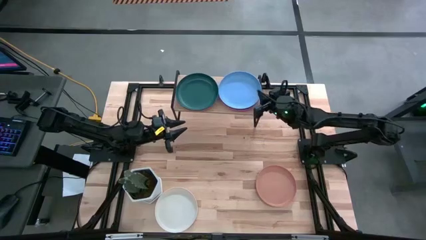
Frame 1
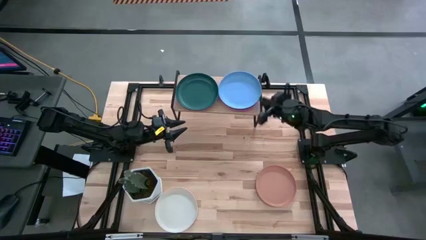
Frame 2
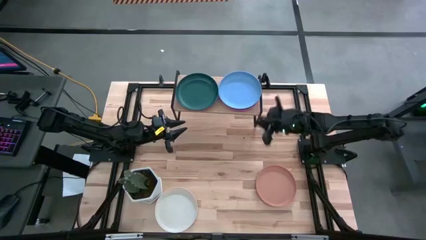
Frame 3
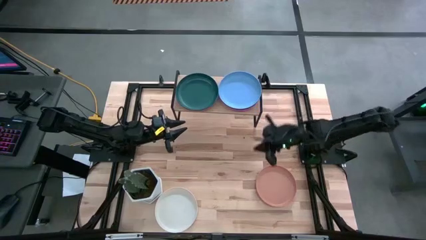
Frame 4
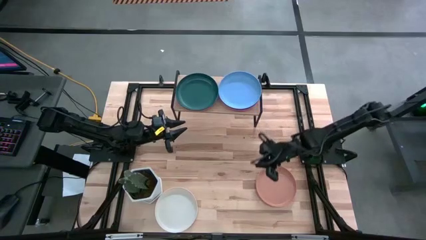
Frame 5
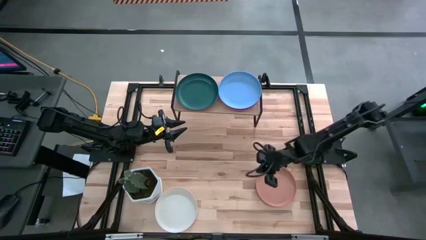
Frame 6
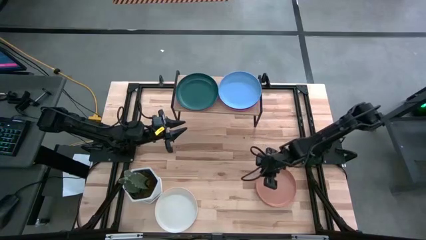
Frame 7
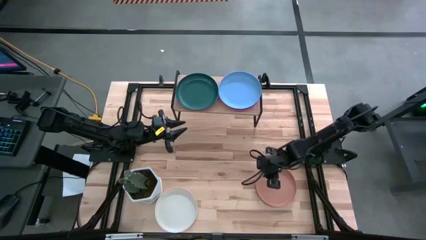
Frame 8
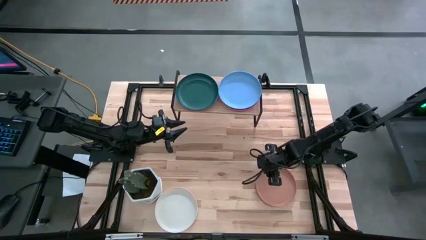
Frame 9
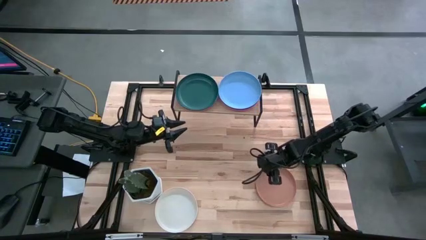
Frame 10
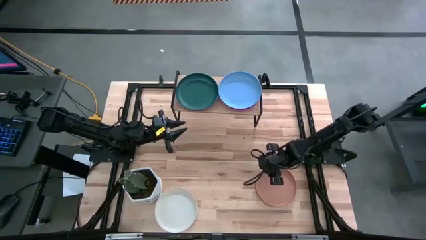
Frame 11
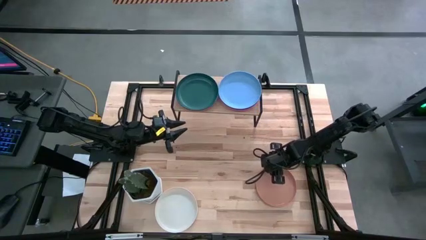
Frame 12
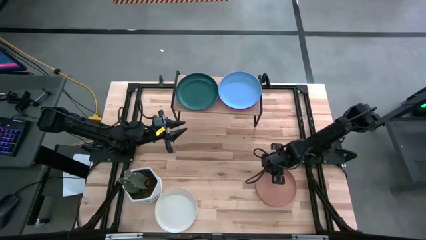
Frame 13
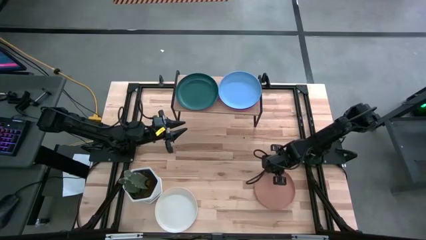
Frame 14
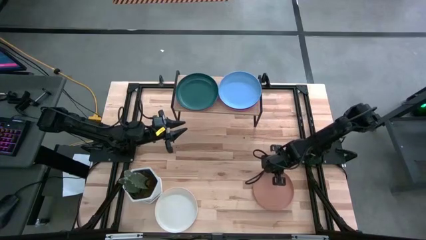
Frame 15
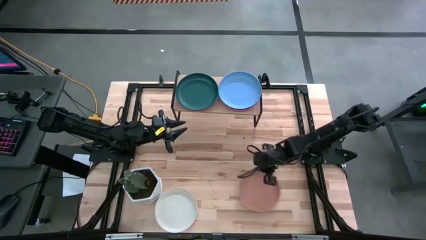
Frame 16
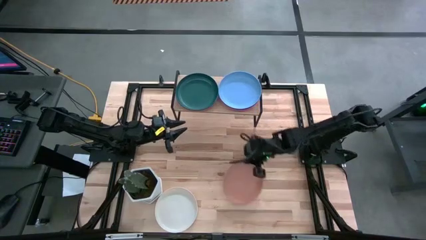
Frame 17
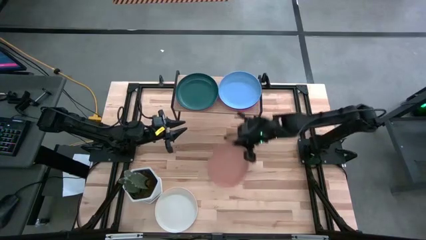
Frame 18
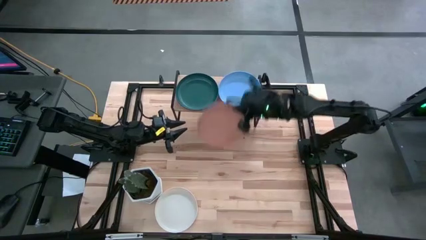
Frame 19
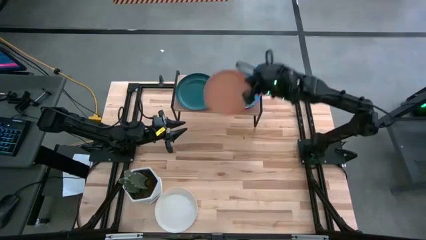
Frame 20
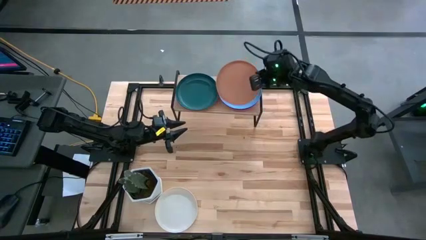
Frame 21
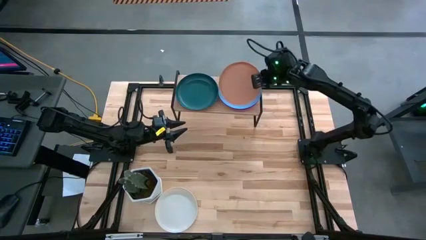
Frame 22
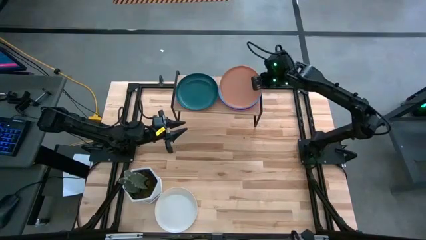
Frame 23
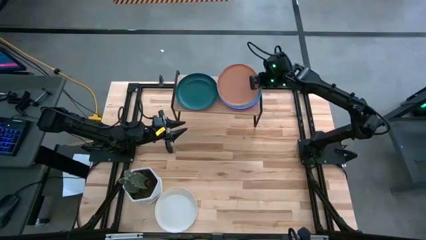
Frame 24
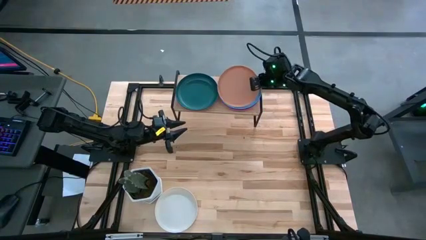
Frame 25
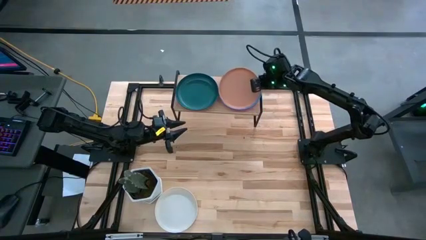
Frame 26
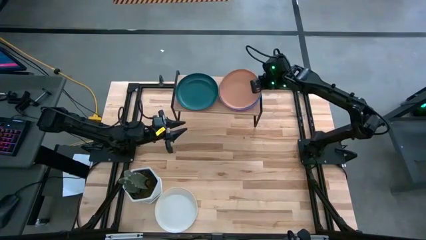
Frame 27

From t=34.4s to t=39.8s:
Task: Place and stack plates onto a shelf
Stack the light orange plate on top of the light blue plate on the shelf

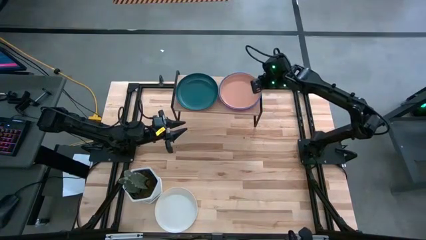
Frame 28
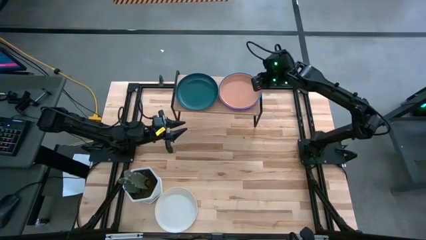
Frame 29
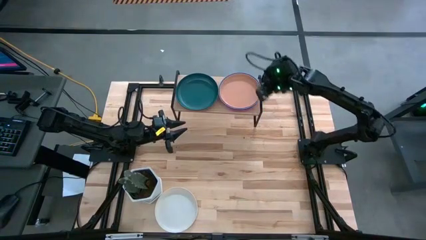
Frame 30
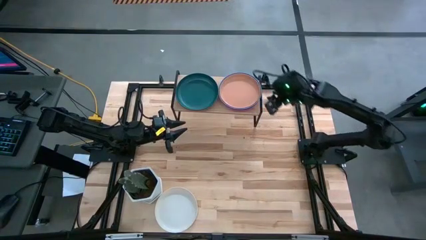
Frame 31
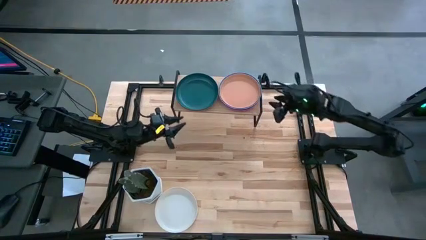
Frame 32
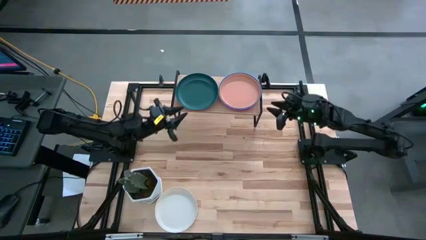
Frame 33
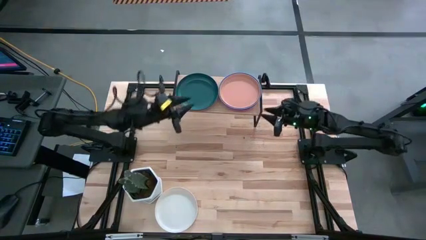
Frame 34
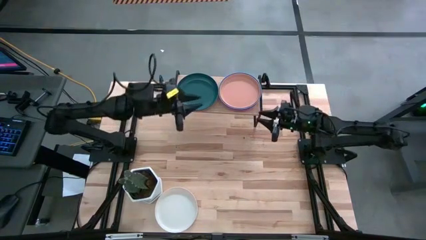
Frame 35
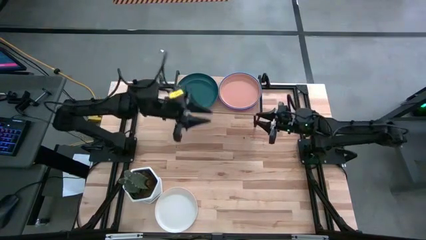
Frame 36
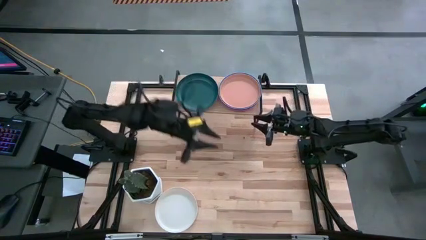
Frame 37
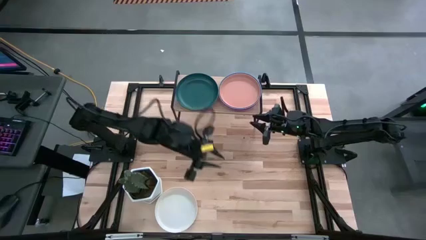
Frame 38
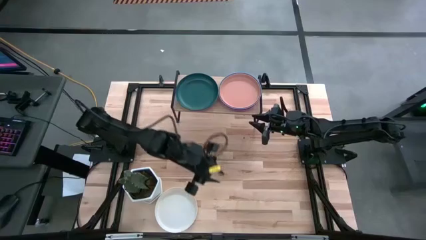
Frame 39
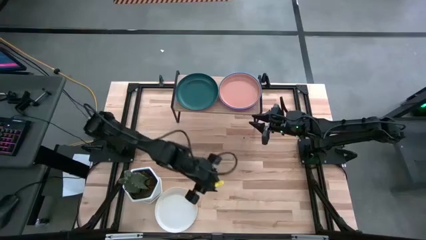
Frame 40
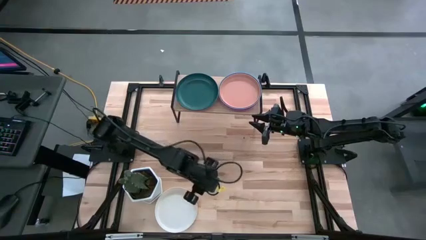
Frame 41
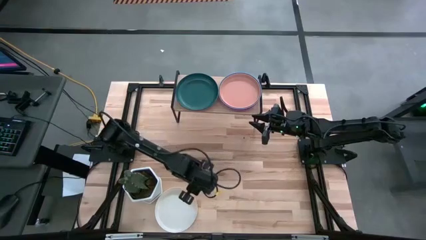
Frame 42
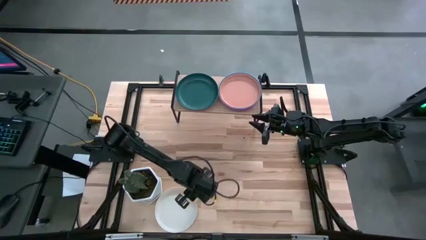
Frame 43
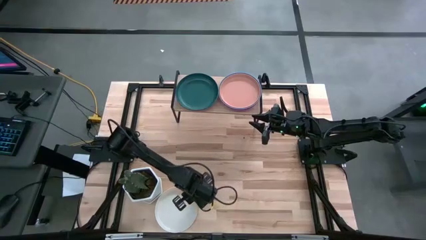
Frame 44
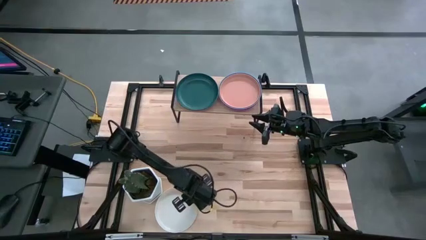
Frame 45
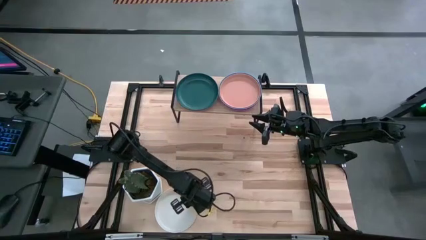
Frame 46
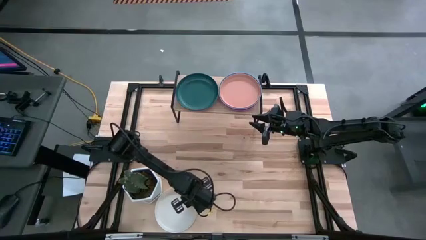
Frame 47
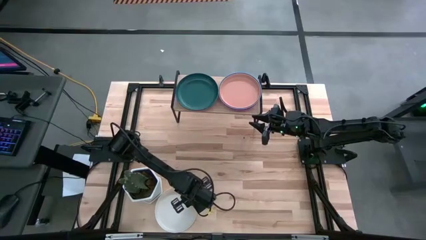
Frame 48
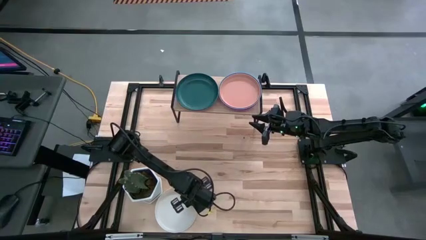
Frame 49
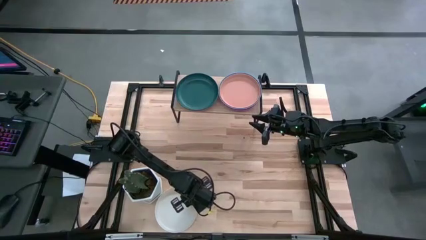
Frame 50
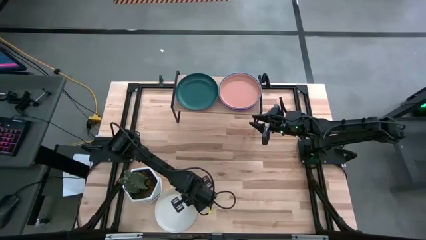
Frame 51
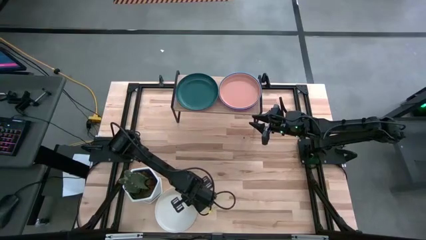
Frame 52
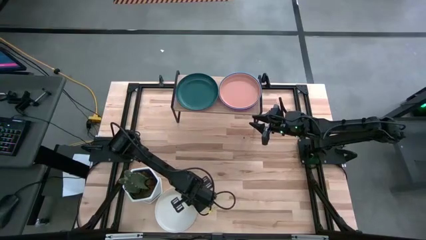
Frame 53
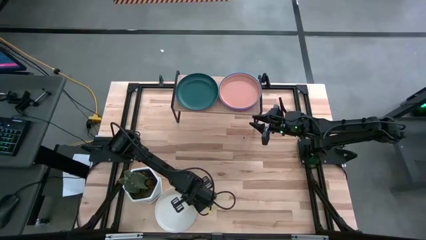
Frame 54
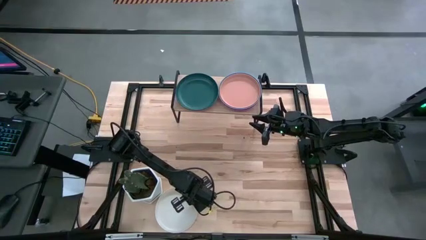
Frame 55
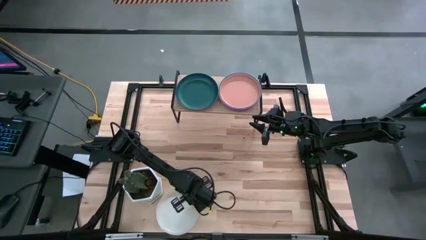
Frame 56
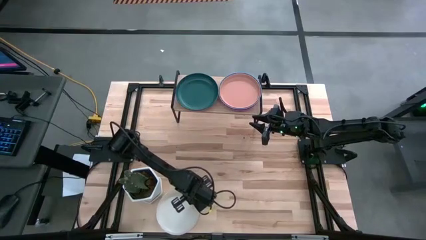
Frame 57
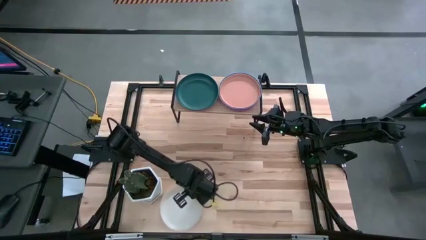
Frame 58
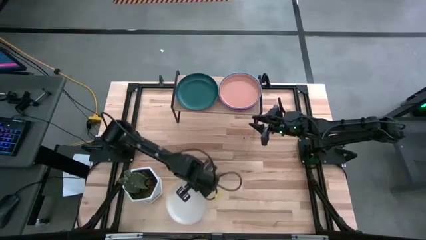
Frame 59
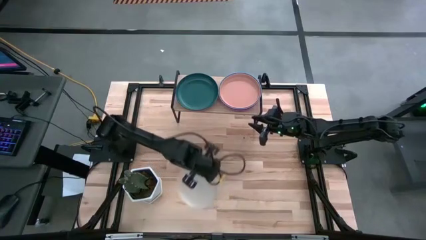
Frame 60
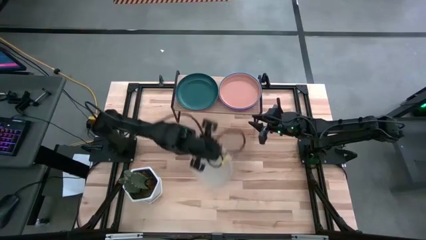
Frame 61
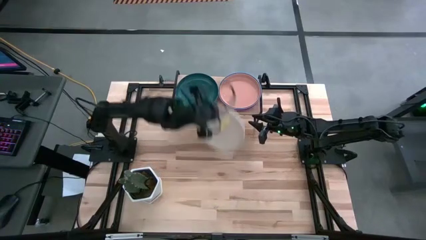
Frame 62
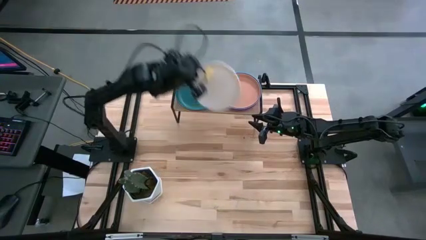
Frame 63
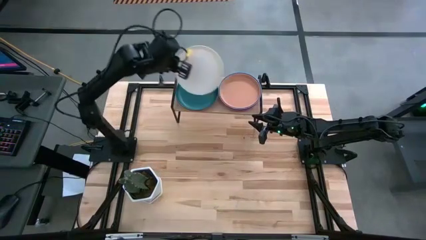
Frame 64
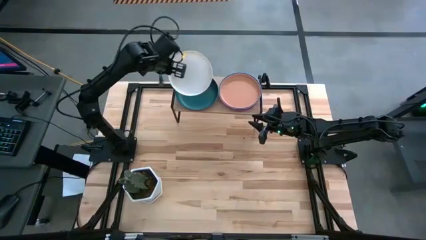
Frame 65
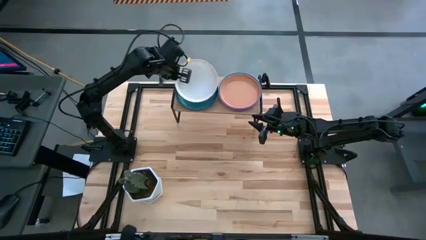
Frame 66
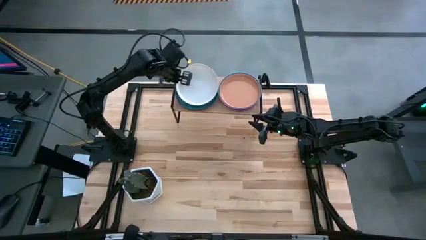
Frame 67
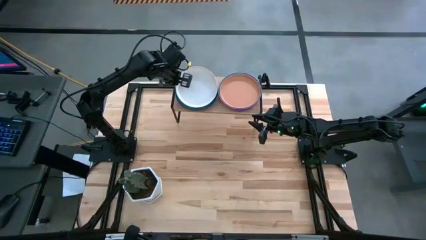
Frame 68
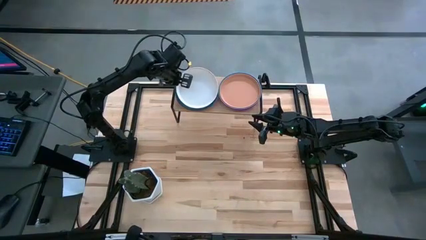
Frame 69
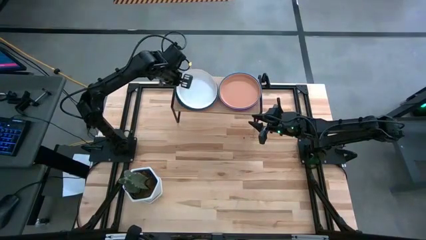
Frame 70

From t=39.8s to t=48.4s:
Stack the white plate on top of the dark green plate on the shelf

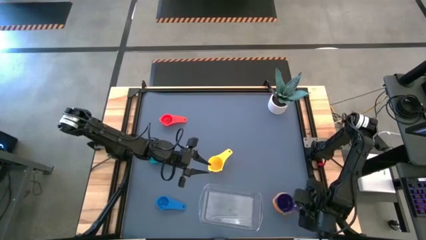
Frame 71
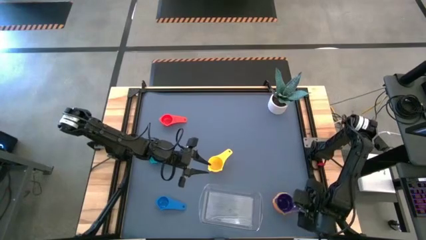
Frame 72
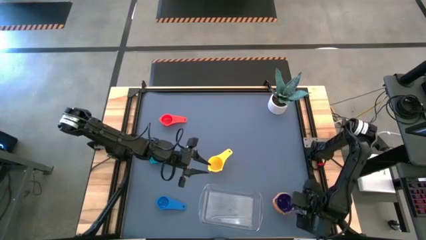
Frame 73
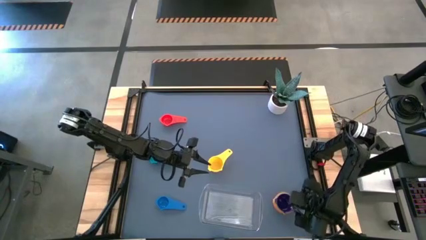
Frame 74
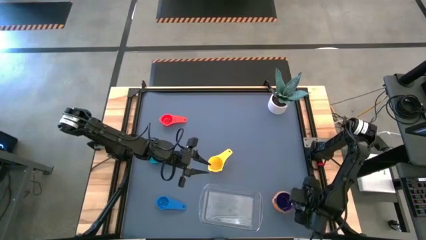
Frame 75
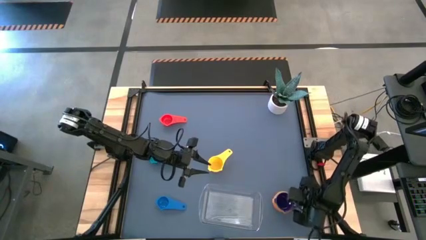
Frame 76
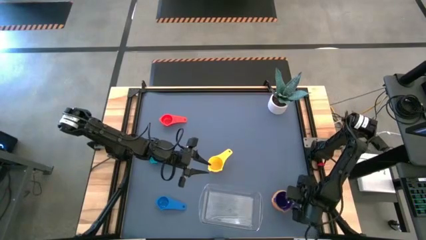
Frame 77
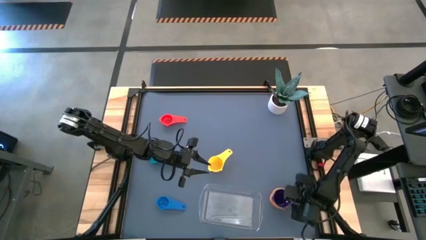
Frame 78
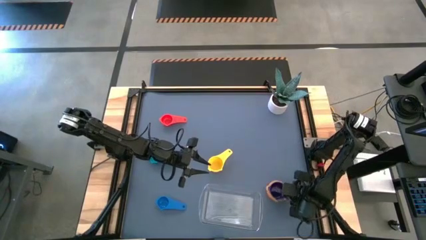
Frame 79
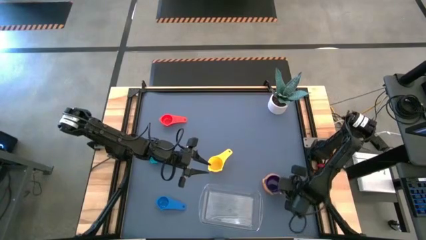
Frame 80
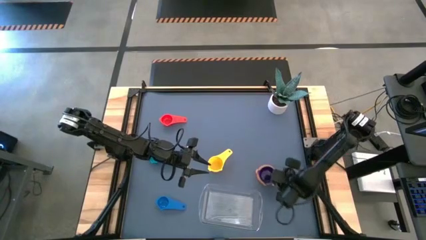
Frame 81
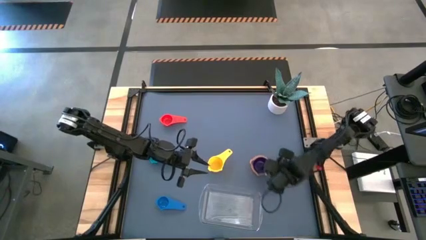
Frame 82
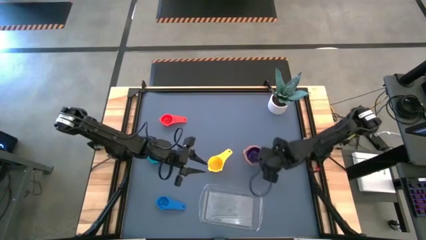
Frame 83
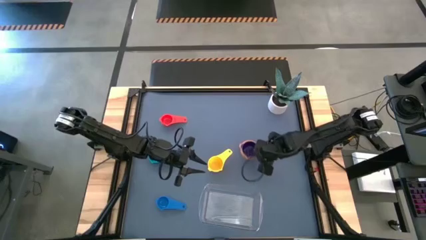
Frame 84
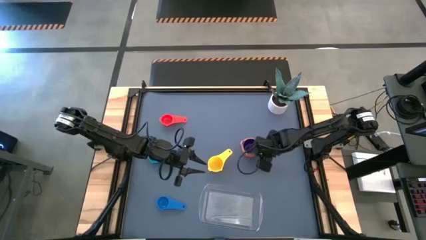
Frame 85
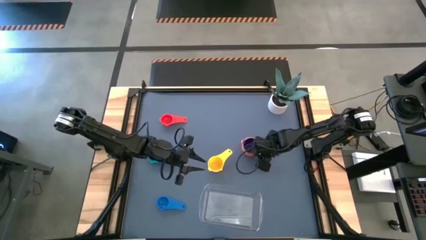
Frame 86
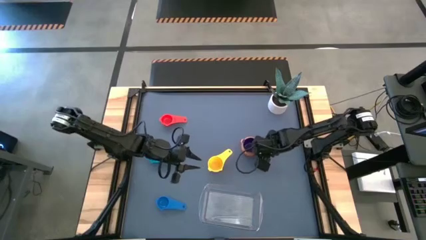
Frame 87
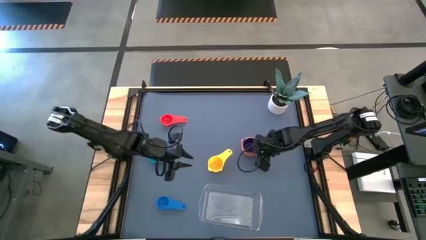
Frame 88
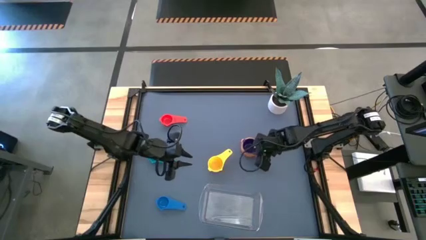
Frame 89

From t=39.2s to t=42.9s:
Task: Nest measuring cups in basket
Move the stacked measuring cups to the center
